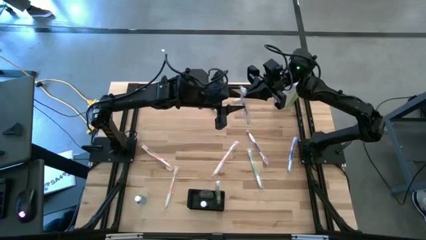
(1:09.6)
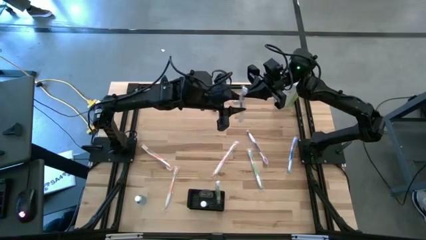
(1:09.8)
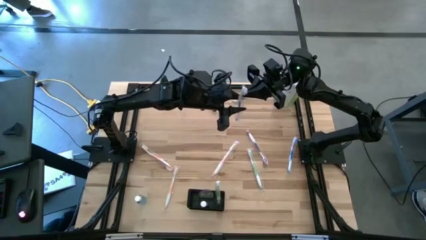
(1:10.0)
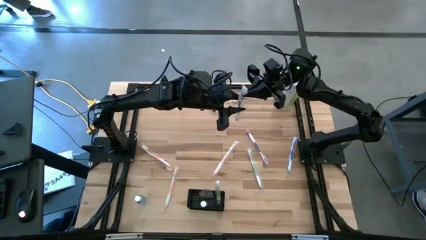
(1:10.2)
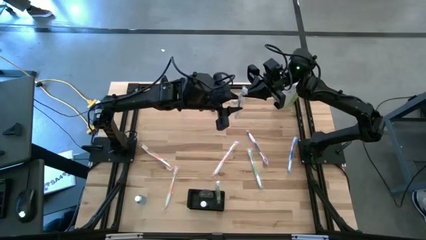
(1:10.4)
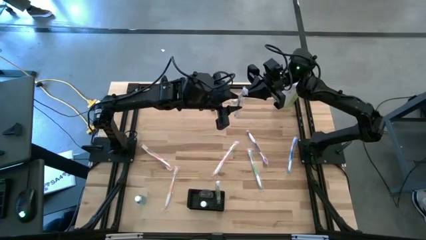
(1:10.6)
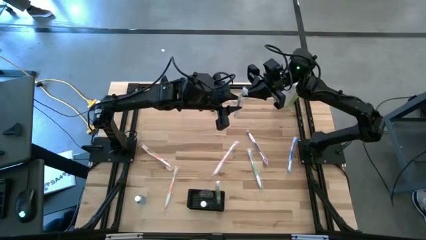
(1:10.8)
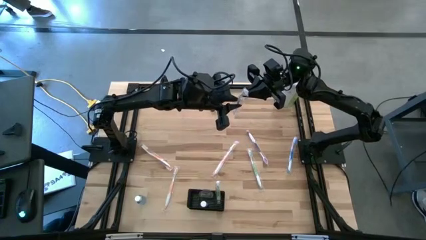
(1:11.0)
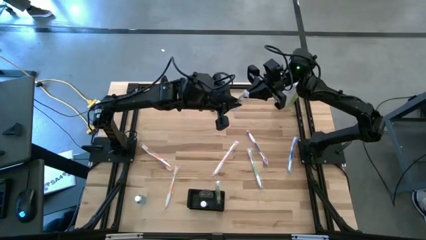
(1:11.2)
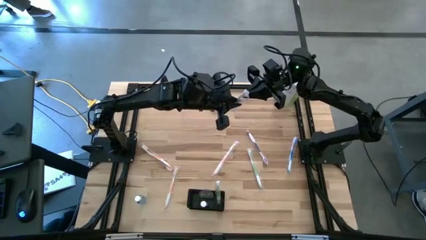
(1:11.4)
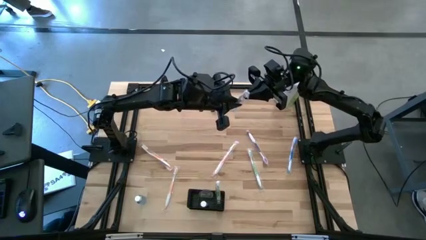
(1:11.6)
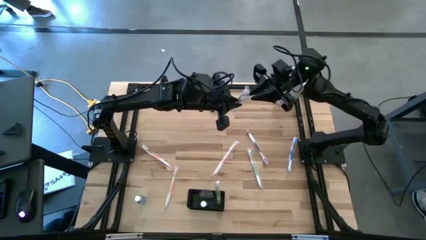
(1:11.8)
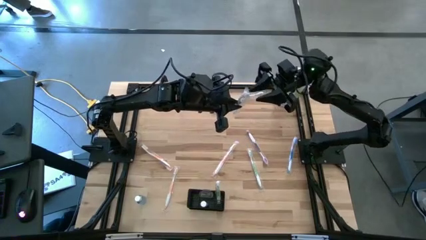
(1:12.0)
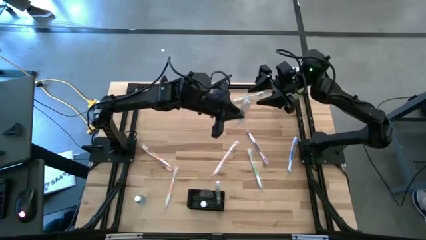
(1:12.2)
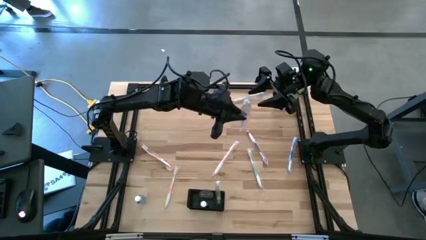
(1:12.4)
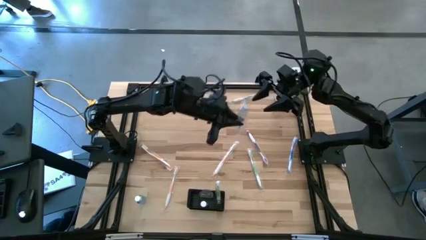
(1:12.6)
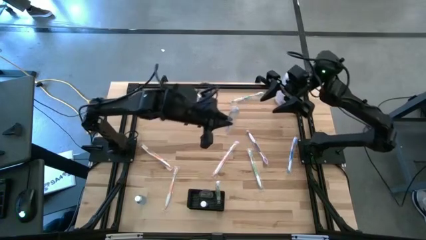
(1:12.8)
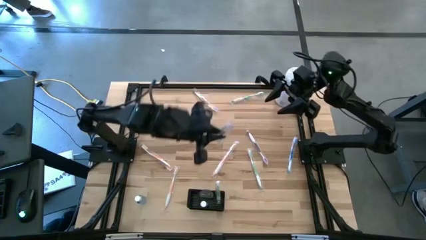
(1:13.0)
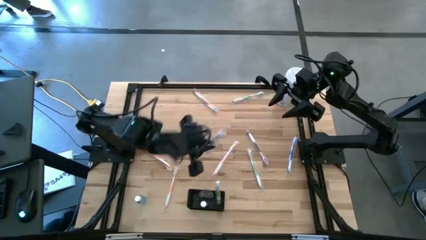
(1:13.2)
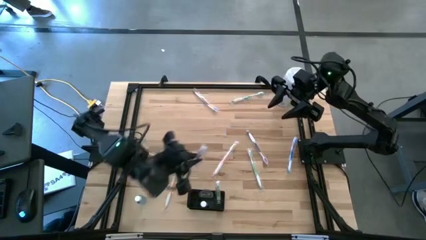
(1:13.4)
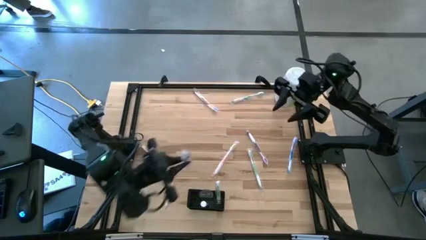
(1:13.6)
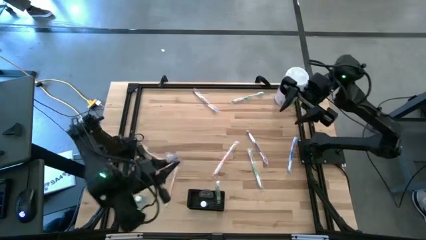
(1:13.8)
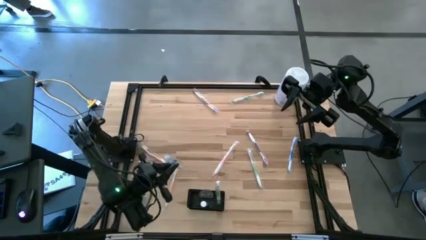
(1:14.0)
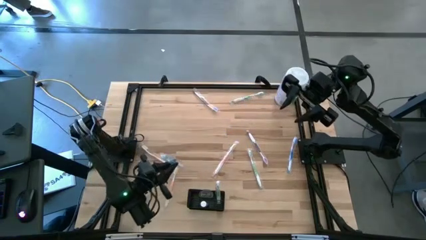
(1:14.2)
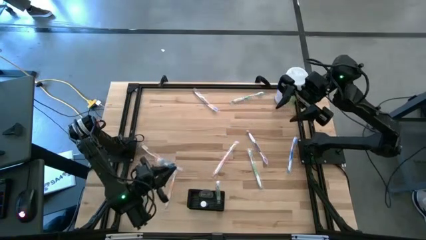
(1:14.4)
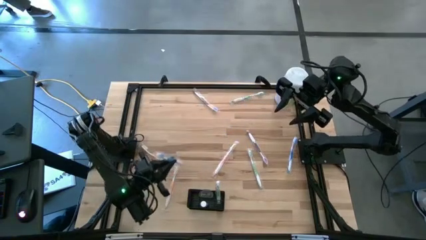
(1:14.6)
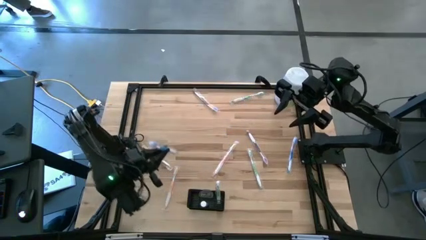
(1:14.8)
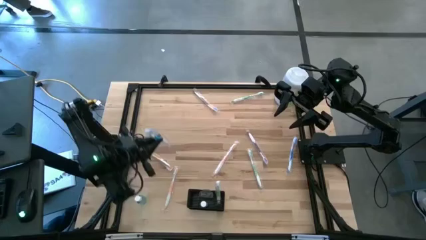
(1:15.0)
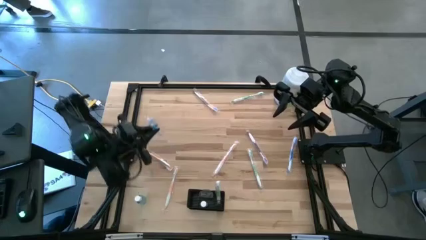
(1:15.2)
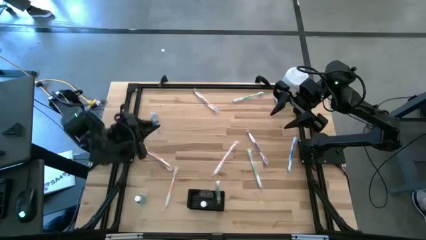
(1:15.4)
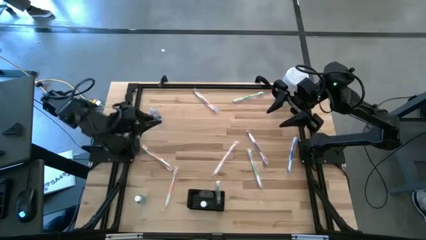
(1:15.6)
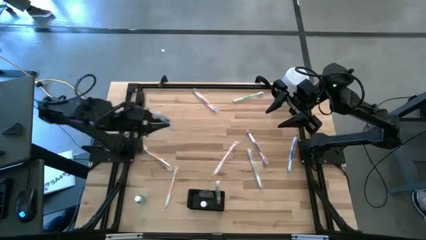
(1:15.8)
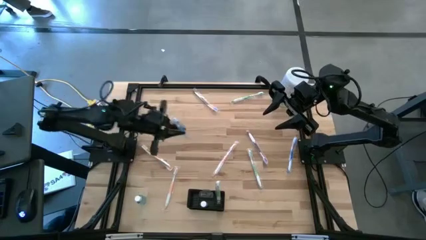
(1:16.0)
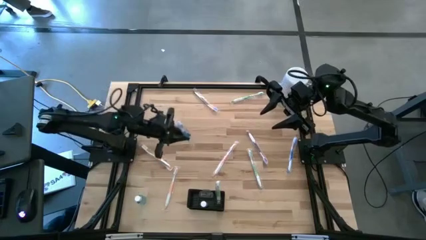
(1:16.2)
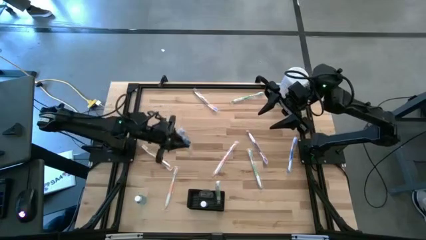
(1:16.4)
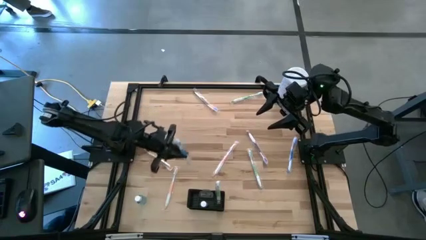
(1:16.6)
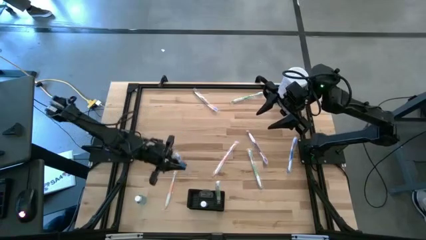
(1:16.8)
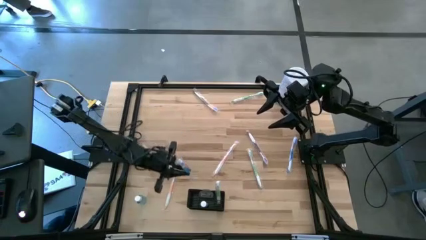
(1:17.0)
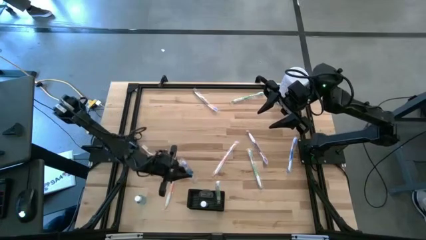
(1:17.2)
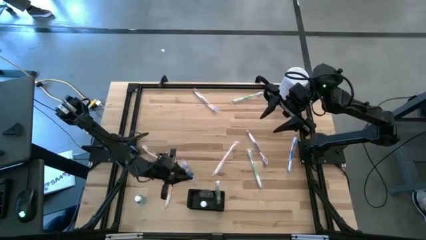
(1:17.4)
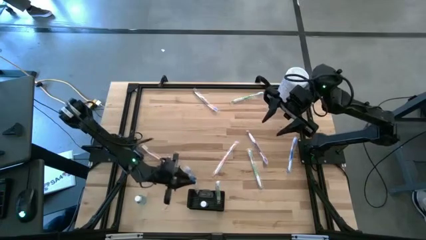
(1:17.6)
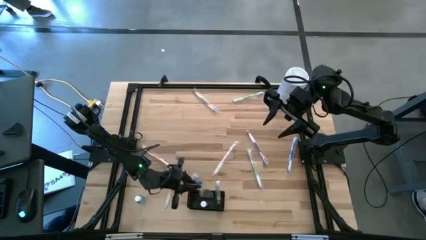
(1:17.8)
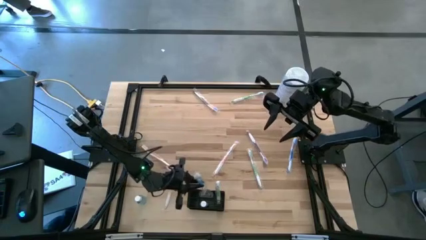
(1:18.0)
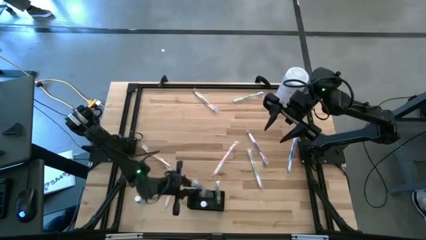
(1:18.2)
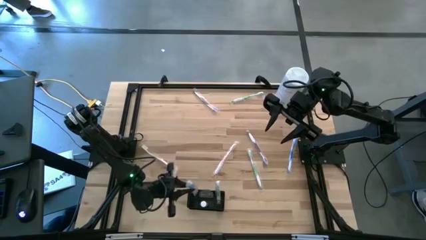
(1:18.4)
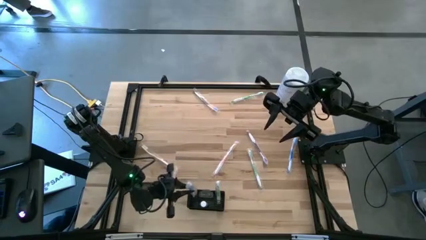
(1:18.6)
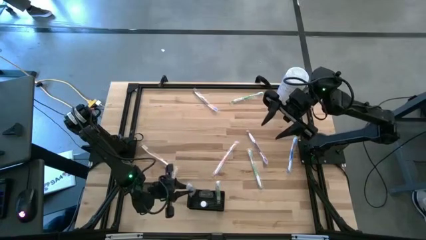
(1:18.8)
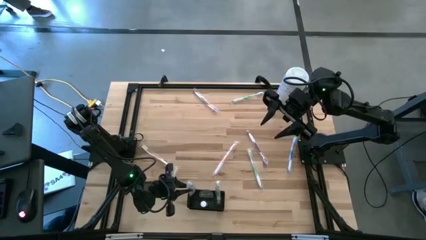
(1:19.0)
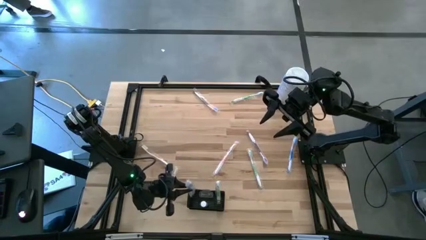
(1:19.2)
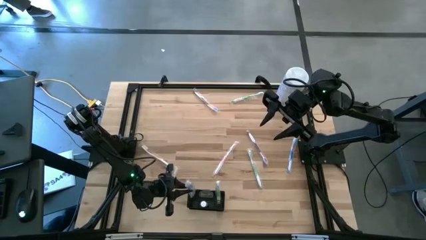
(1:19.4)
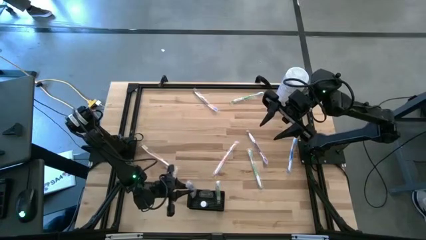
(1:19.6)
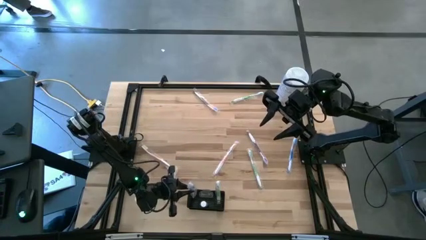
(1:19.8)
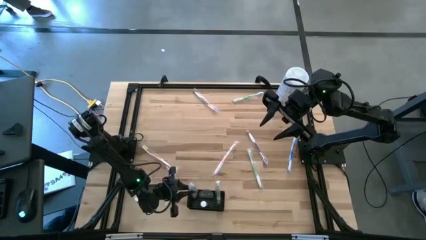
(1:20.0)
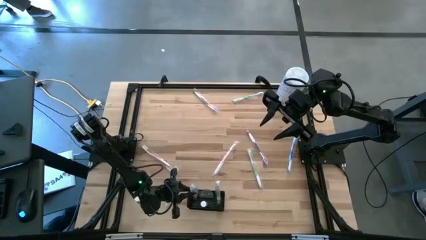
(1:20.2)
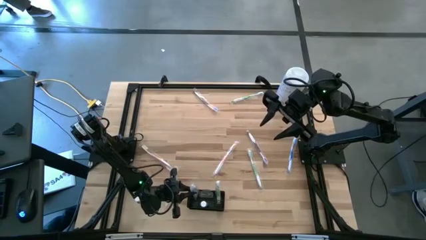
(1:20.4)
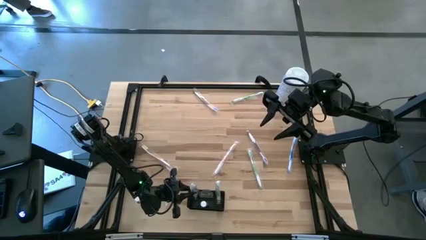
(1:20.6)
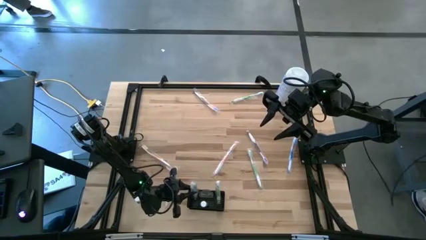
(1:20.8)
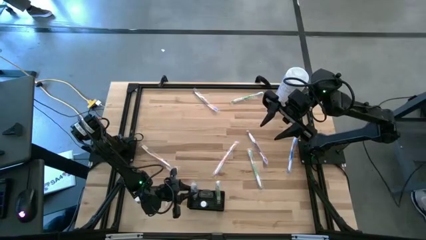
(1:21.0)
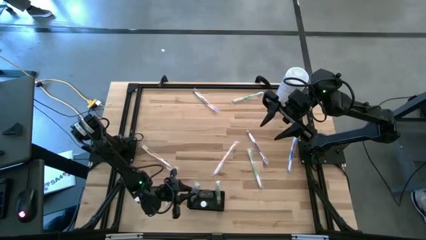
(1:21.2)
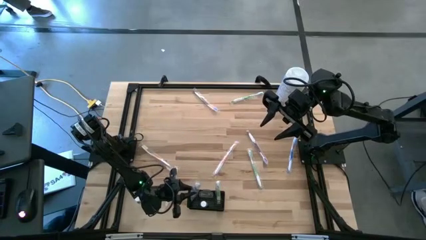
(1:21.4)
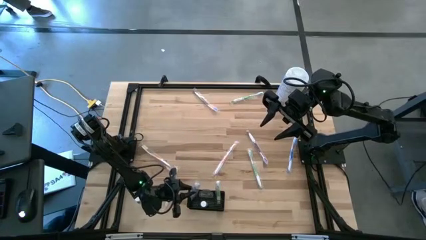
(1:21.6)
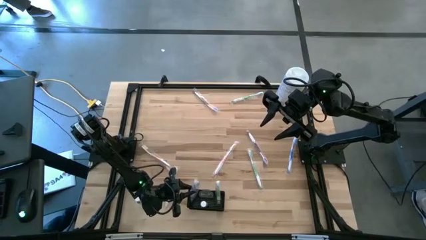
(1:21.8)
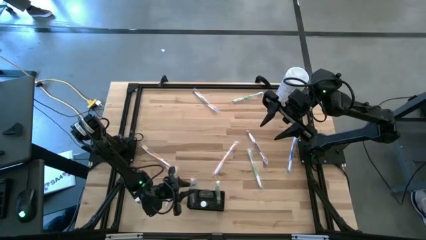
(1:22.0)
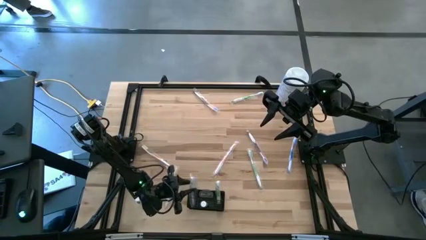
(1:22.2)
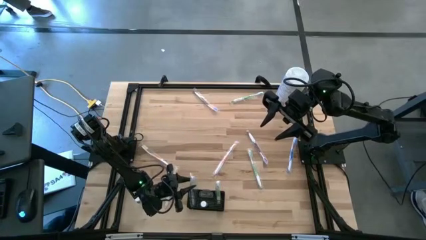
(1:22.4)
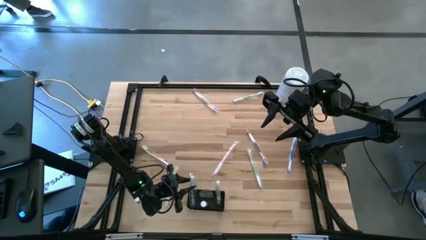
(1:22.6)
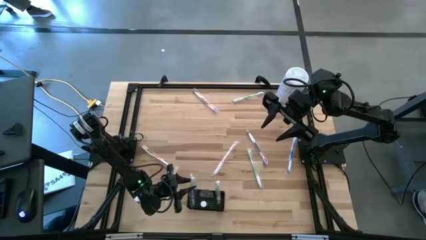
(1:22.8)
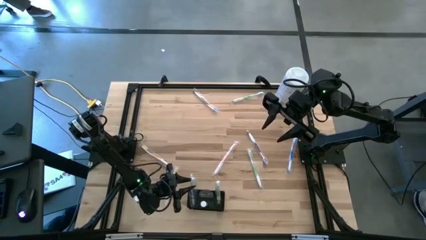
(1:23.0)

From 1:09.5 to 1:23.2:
Task: Pick & Place toothbrushing station
Put the left blue toothbrush into the black wire organizer

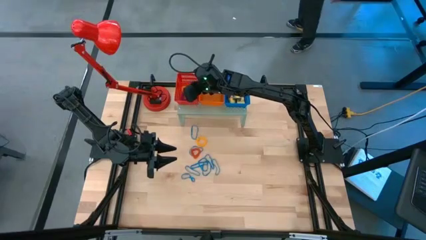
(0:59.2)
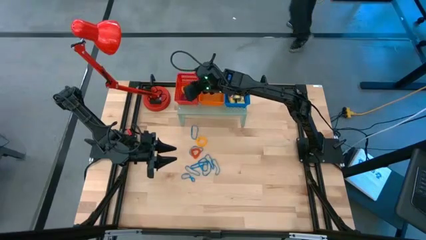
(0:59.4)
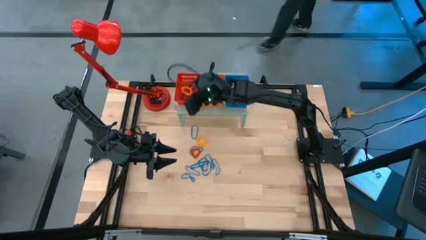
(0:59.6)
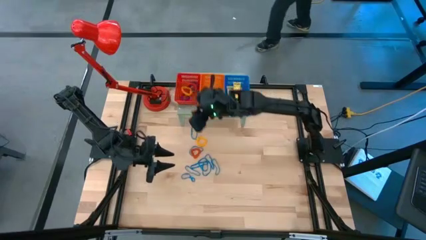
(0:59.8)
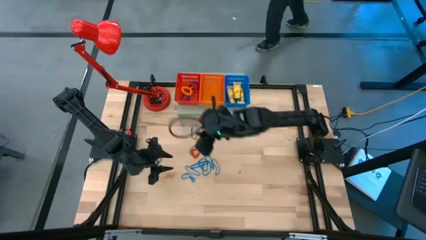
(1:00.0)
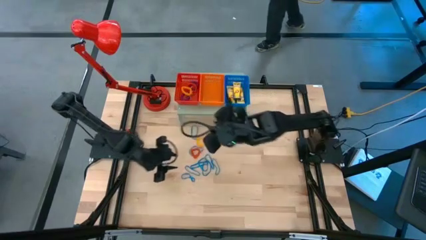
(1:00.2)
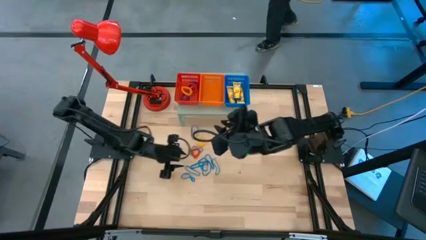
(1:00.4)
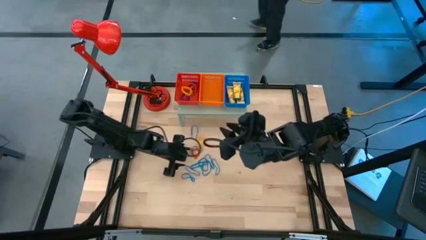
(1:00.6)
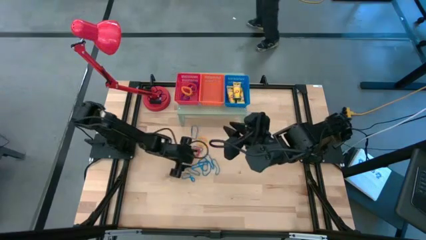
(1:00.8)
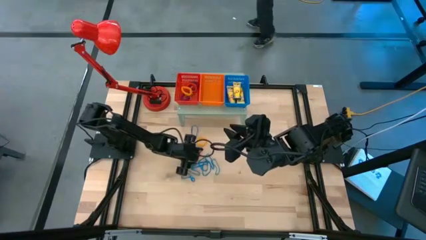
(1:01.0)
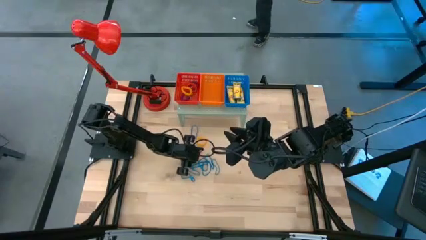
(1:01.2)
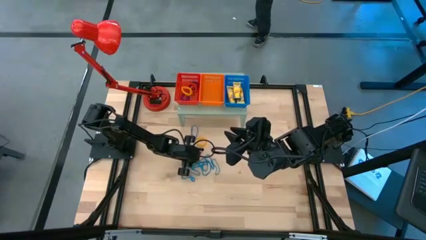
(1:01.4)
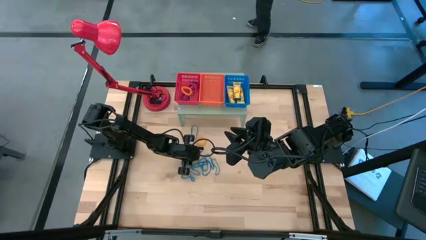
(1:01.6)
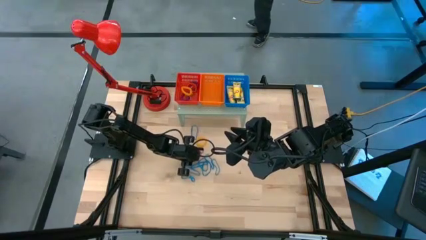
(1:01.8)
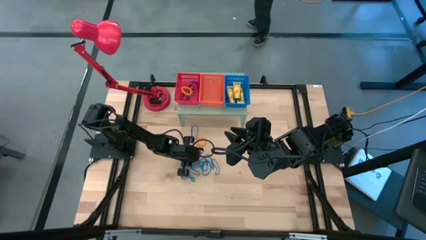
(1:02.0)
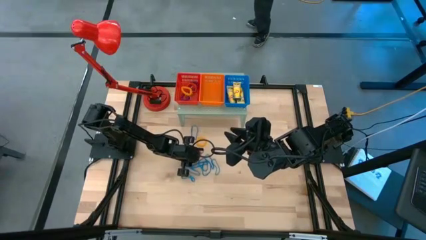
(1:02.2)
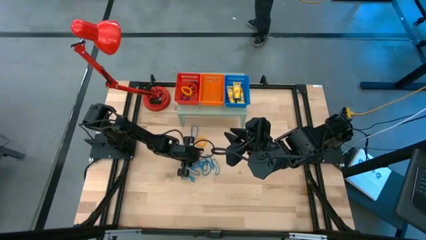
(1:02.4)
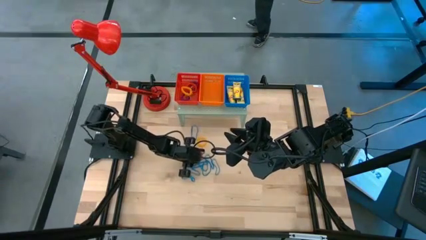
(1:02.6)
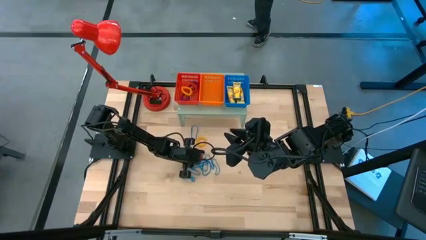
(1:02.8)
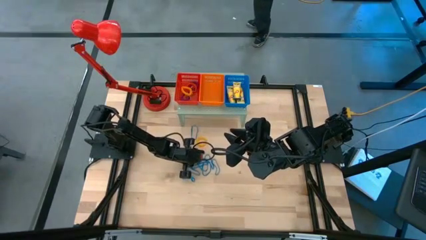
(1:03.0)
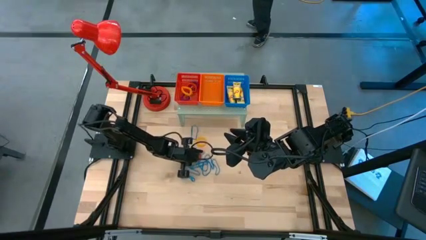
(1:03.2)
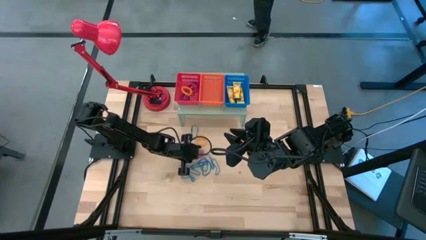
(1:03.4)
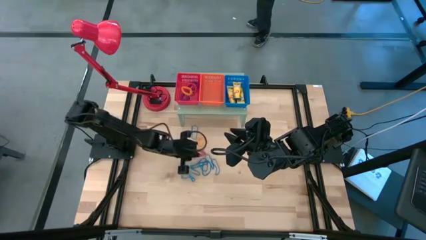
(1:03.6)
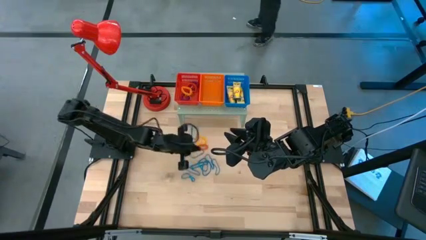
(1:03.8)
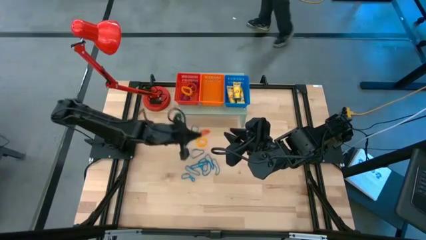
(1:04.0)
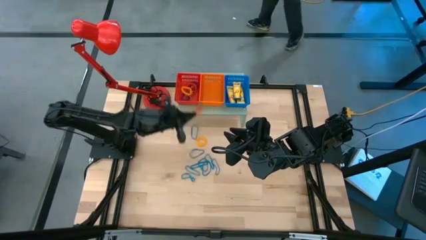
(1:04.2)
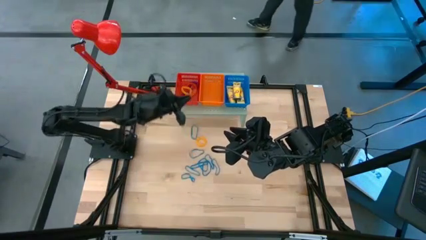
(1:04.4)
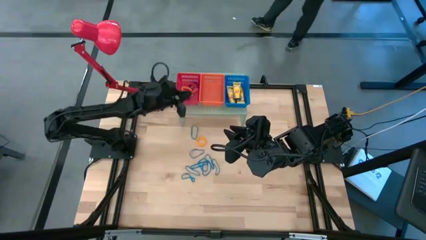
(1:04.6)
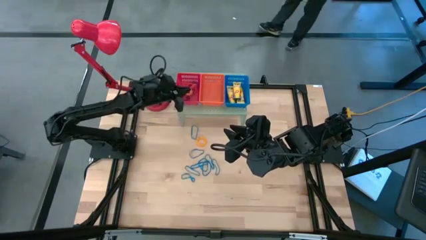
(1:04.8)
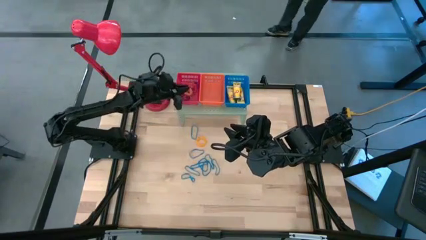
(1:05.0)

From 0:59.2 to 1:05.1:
Task: Pick & Place Office Desk Supplies
Put the orange spring keychain into the red bin on the shelf
